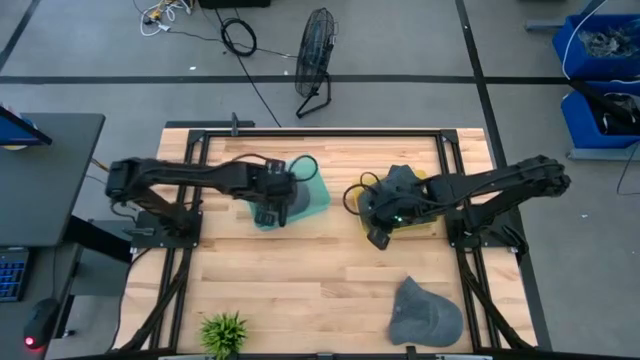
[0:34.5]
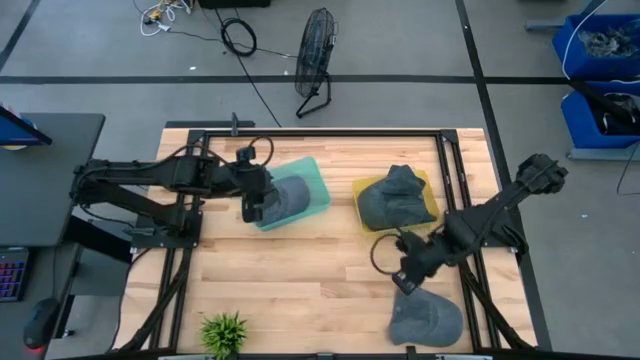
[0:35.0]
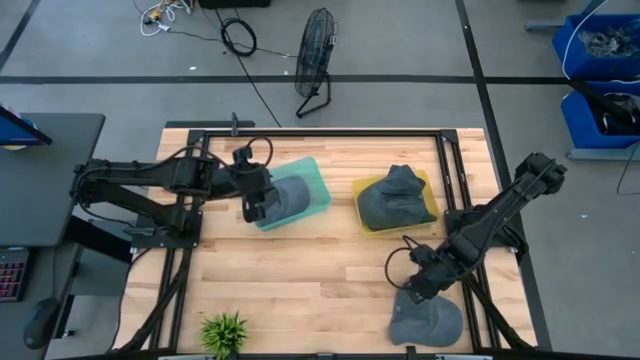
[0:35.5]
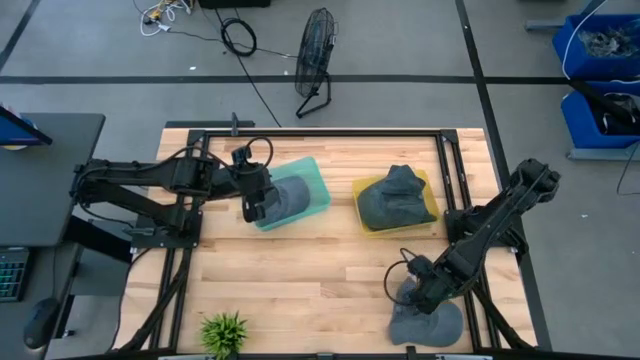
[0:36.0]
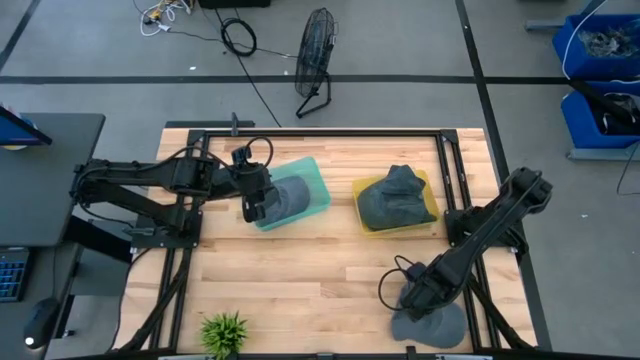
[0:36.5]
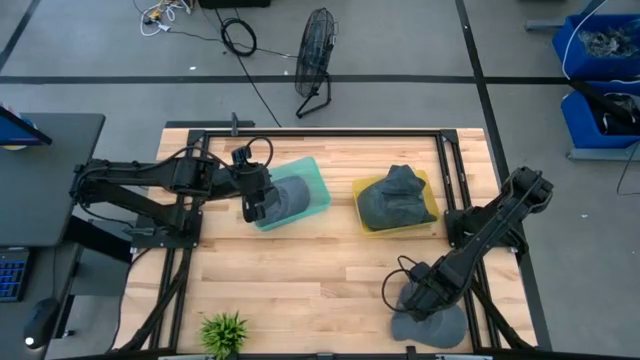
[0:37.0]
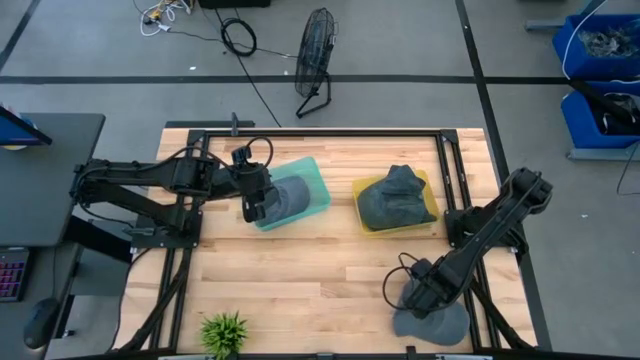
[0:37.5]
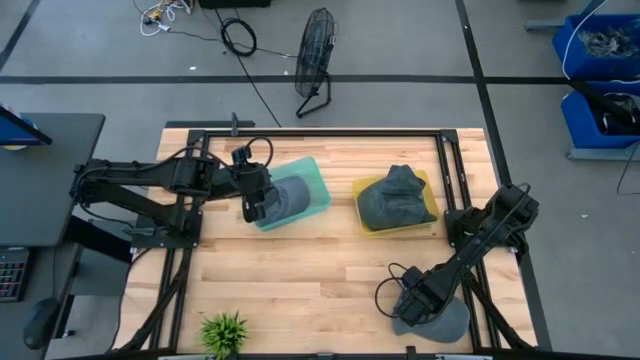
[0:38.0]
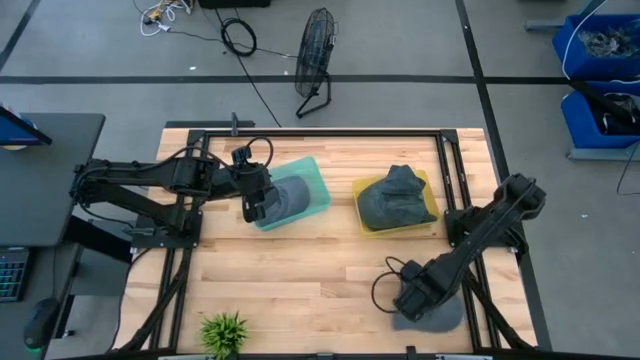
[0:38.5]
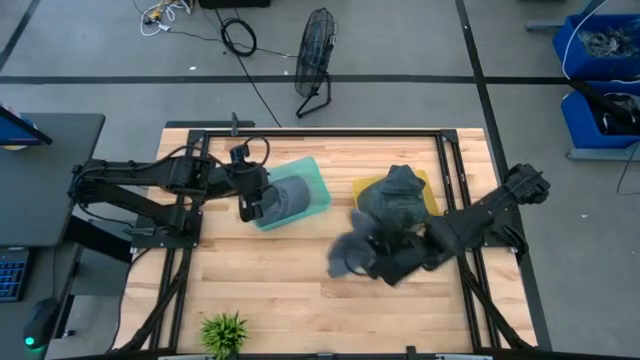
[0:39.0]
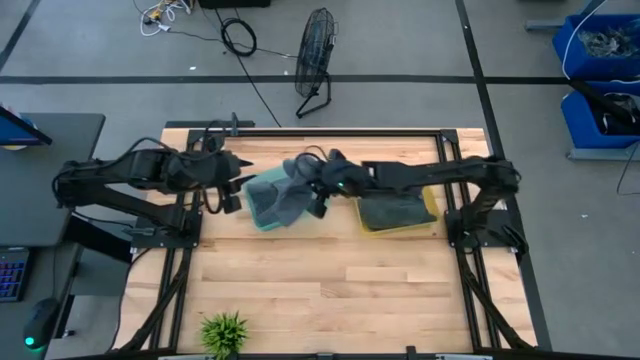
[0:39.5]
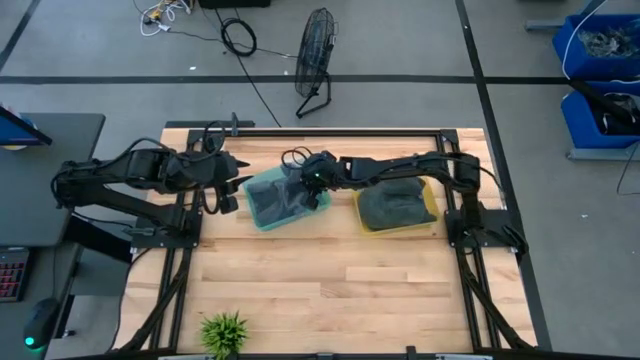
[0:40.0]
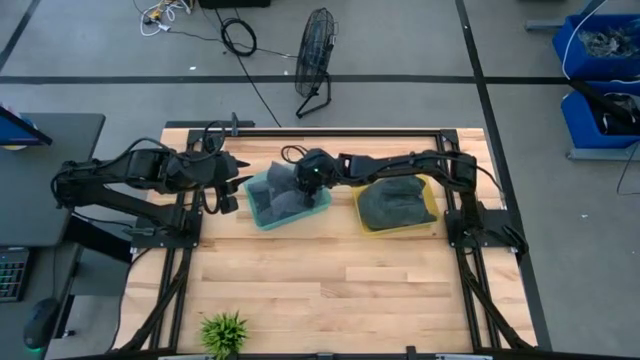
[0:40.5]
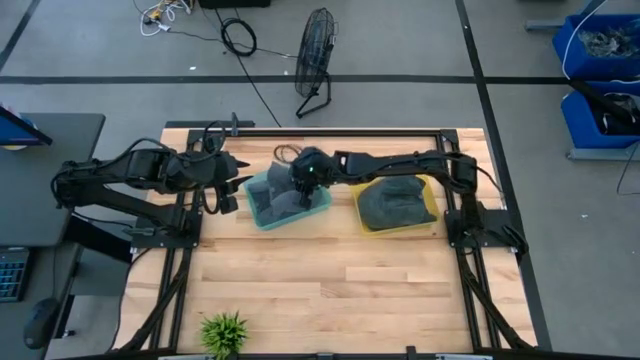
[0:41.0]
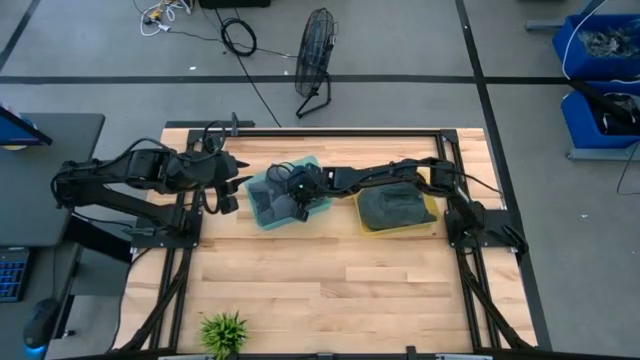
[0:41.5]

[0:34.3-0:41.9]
Task: Pick & Place hat
Put the gray cap into the blue bin

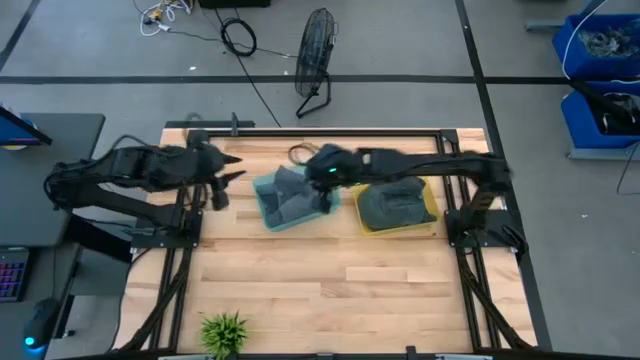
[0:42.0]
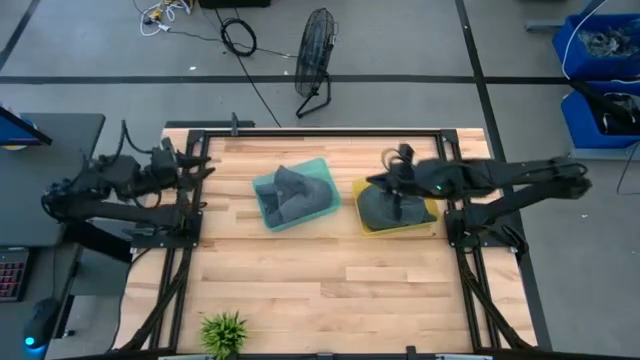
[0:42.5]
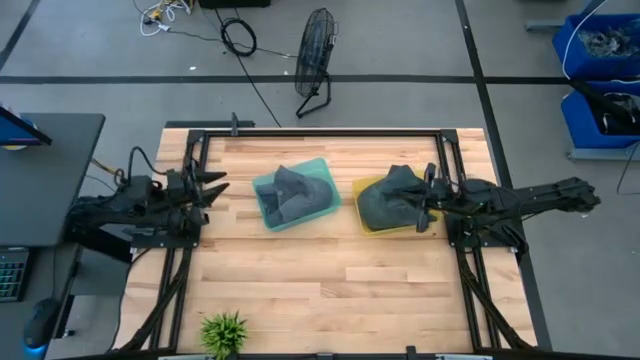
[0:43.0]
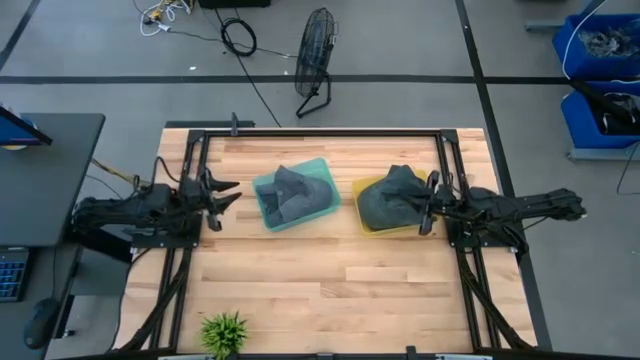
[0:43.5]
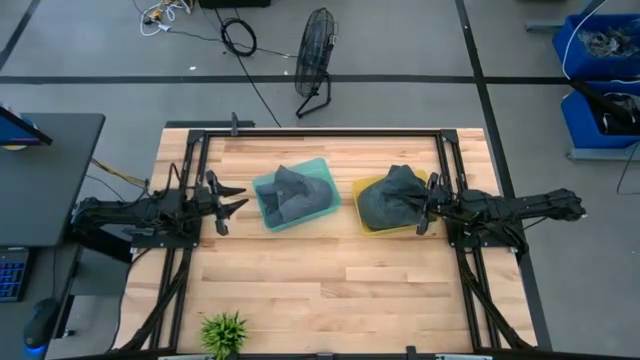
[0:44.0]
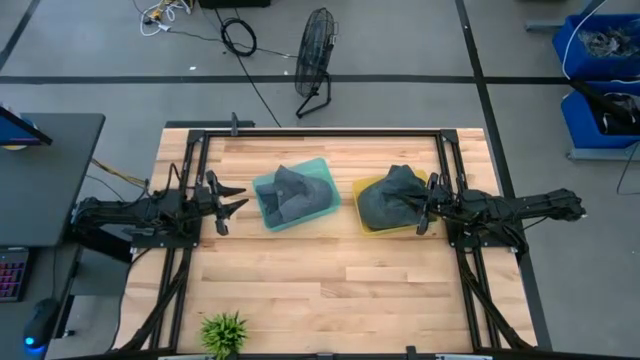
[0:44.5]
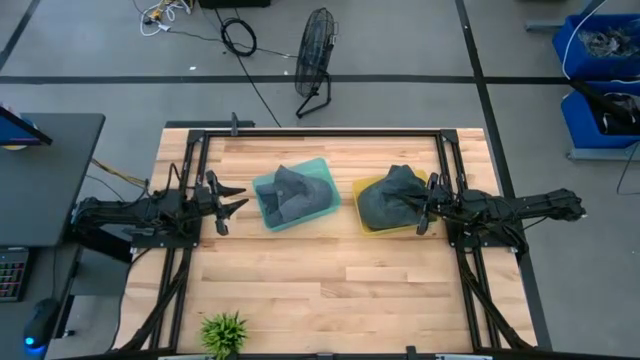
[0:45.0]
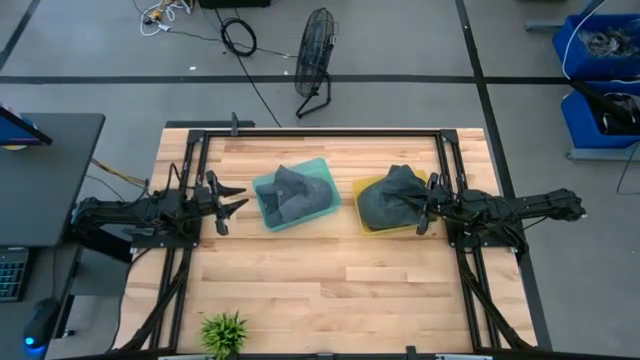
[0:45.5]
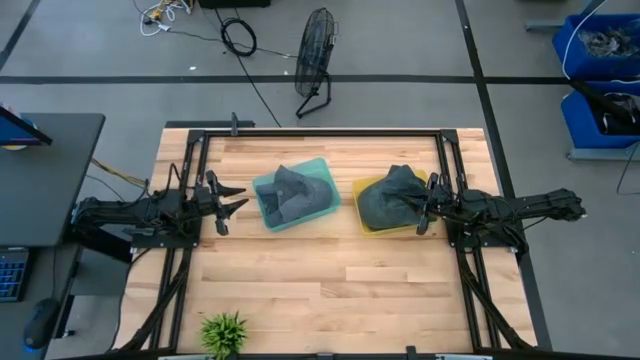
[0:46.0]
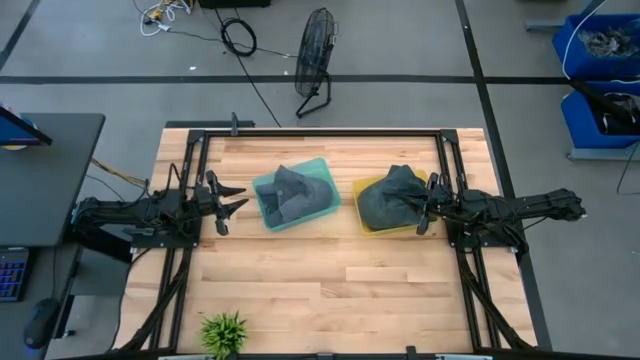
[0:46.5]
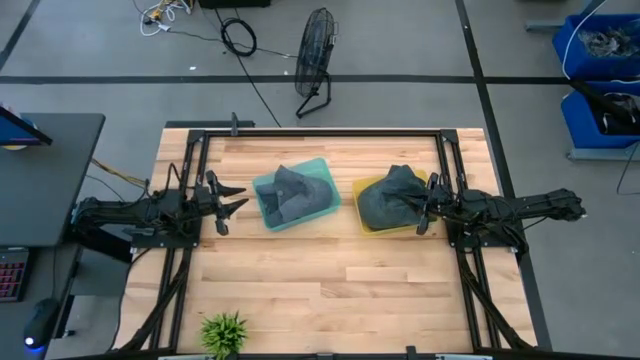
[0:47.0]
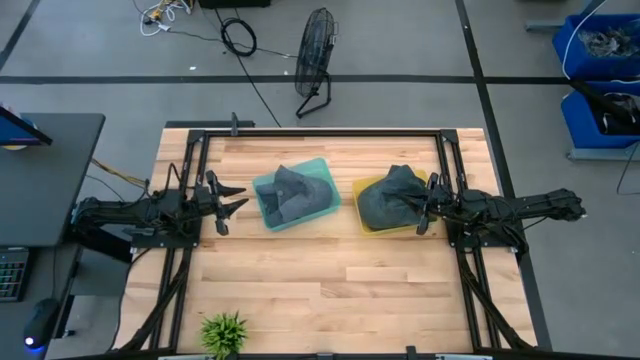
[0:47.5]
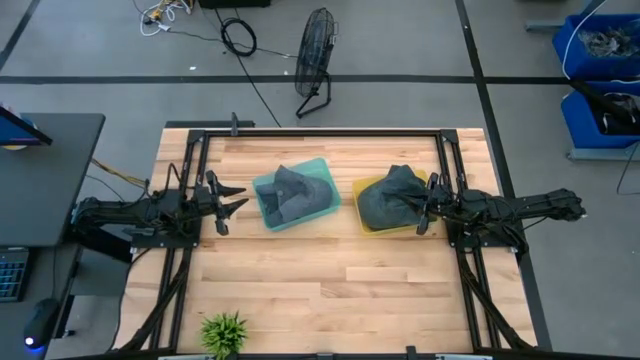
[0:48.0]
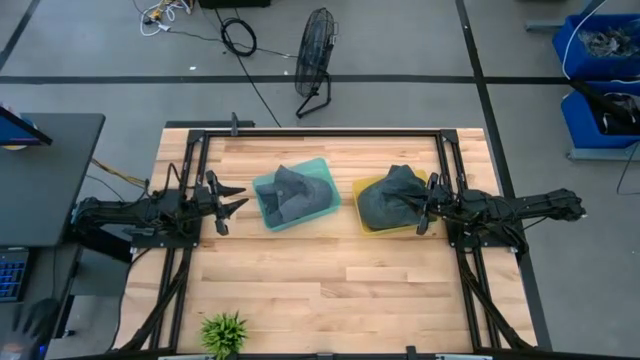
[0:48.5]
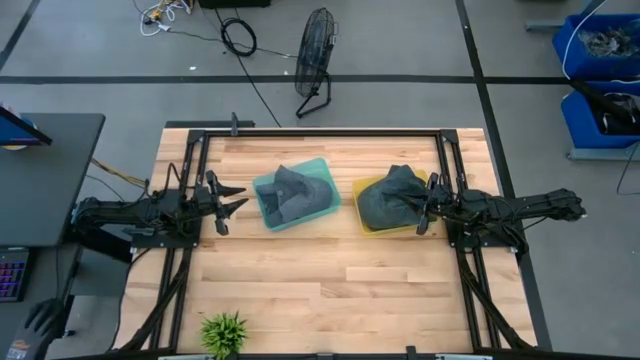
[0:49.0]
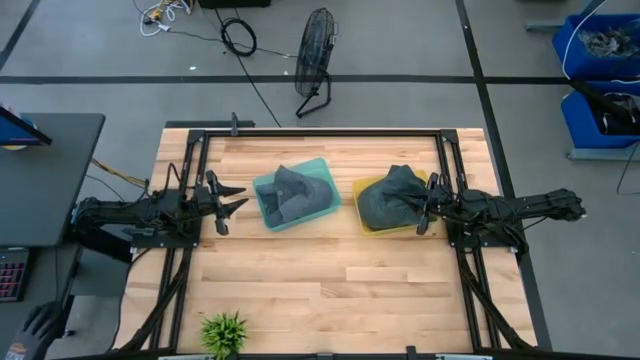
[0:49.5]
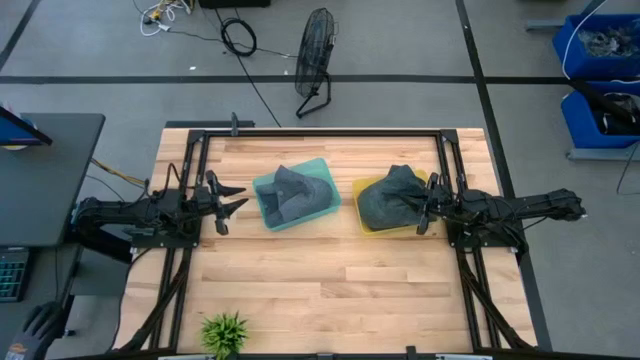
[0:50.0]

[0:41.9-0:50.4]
Return to Home Position

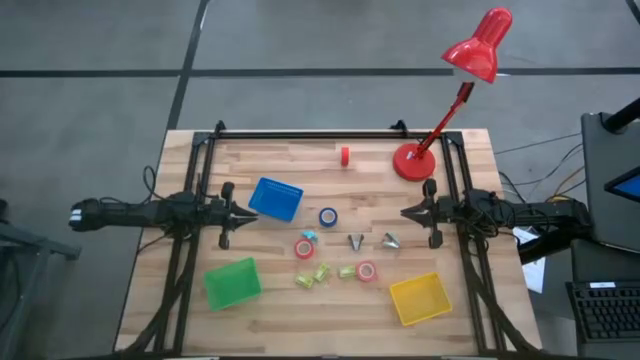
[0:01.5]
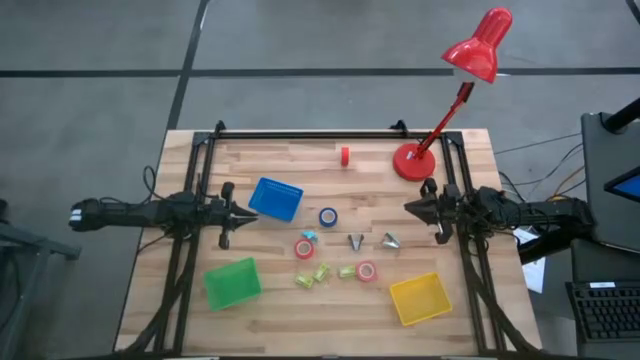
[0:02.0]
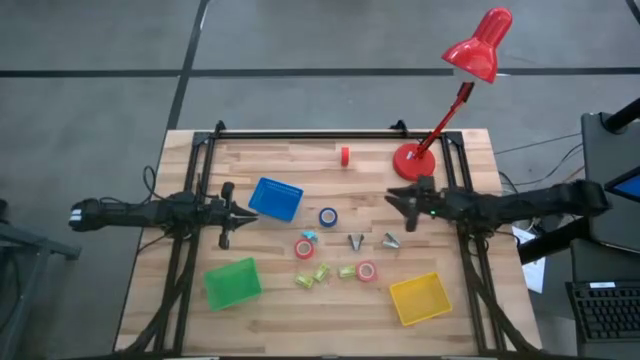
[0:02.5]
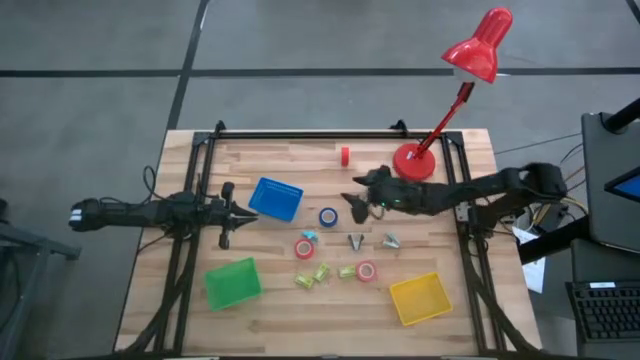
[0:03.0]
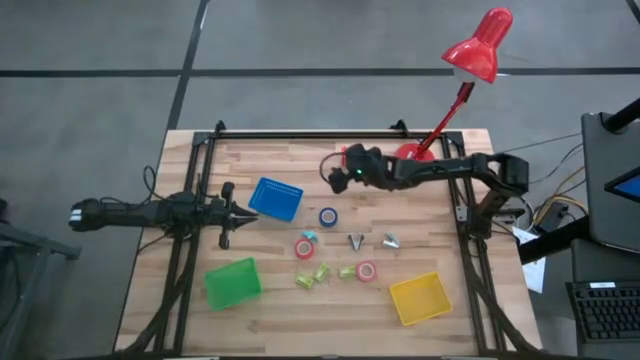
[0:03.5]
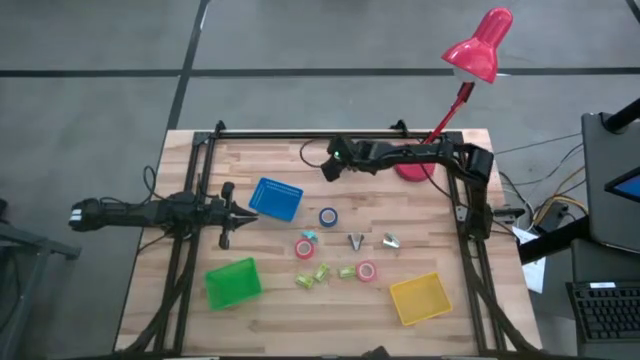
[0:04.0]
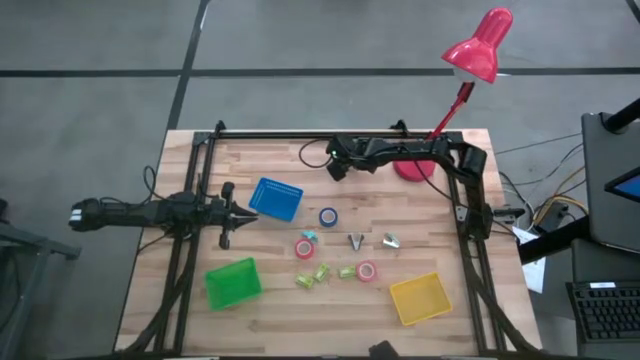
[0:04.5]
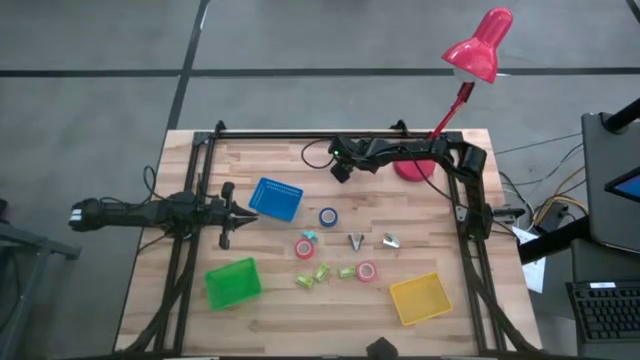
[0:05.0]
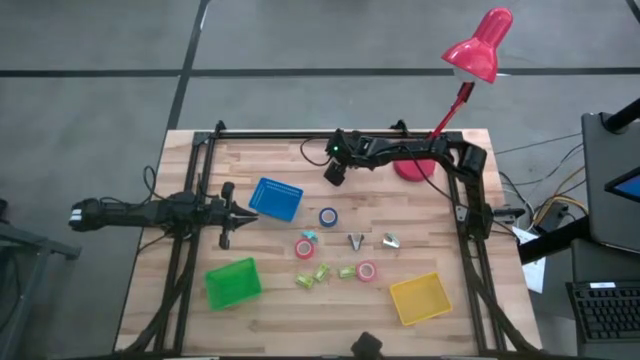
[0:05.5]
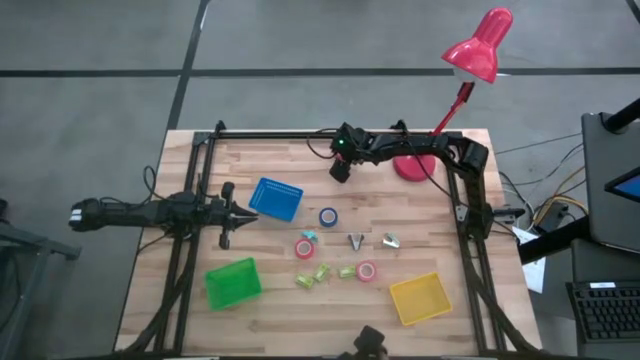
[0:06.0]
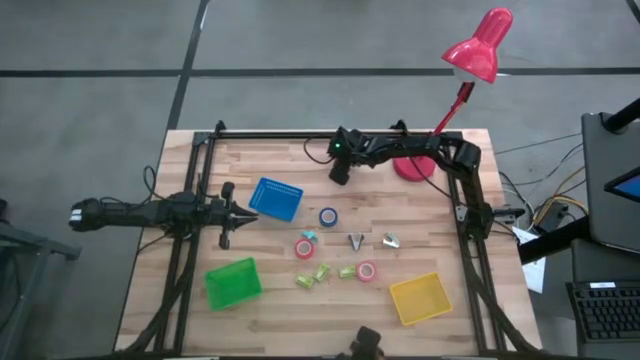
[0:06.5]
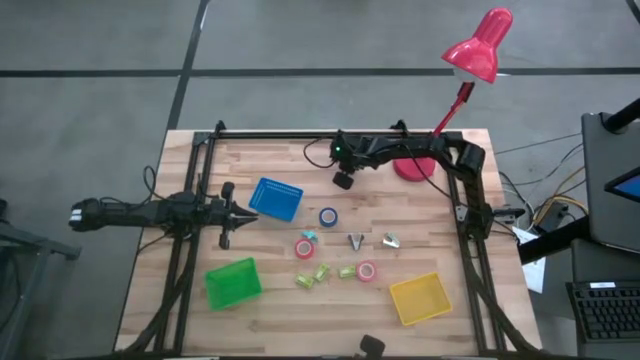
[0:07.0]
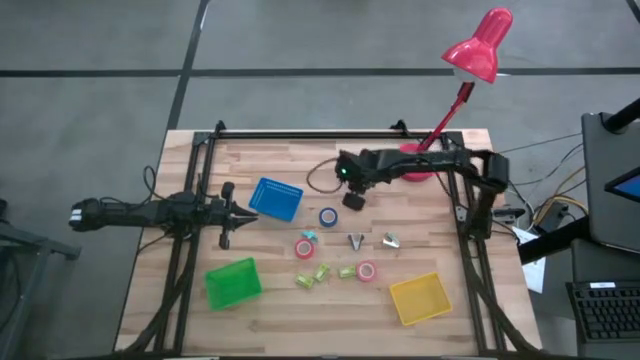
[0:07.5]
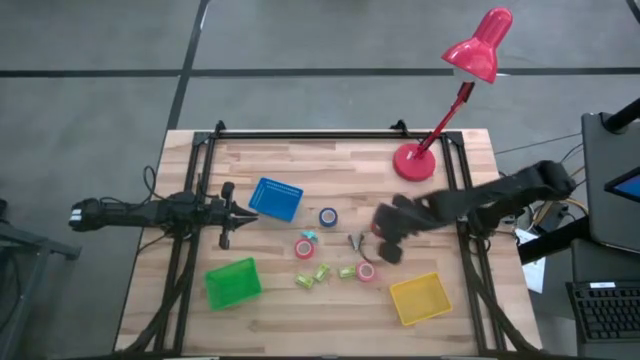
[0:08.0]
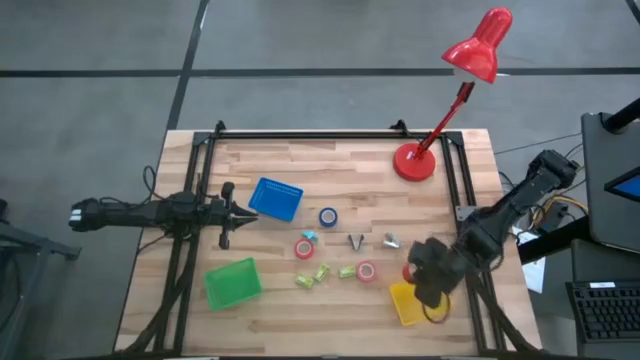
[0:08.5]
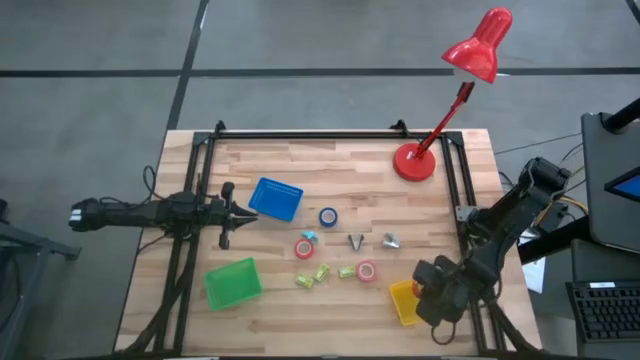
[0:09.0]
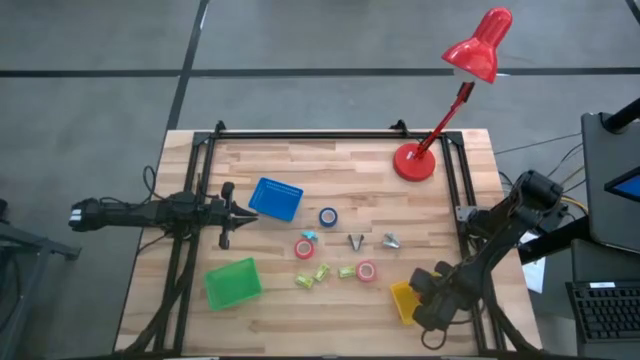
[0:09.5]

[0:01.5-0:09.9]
Task: Pick and place Stapler, Stapler remover, tape
Put the top red tape into the yellow bin
